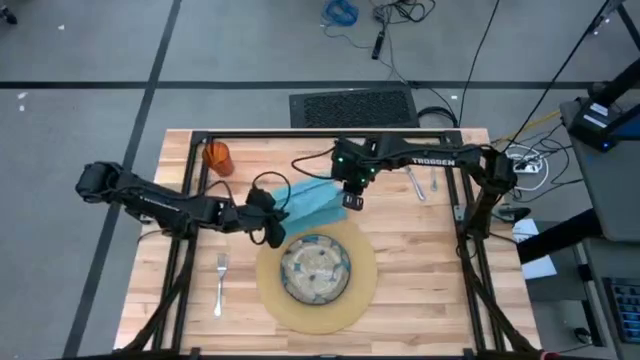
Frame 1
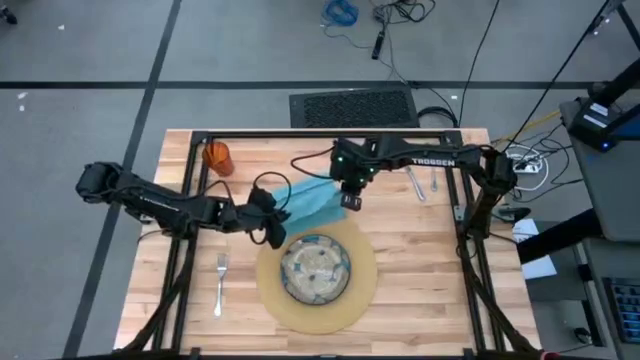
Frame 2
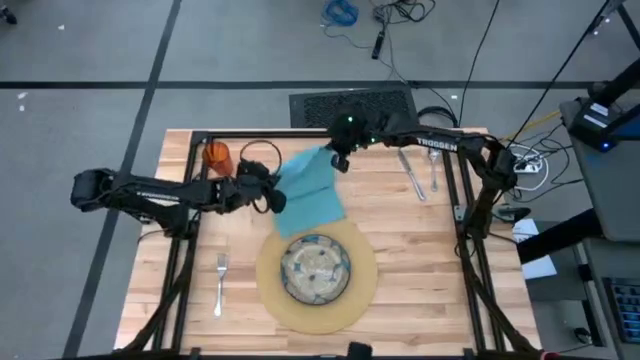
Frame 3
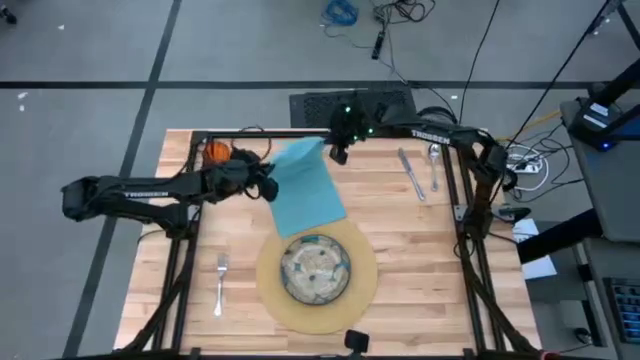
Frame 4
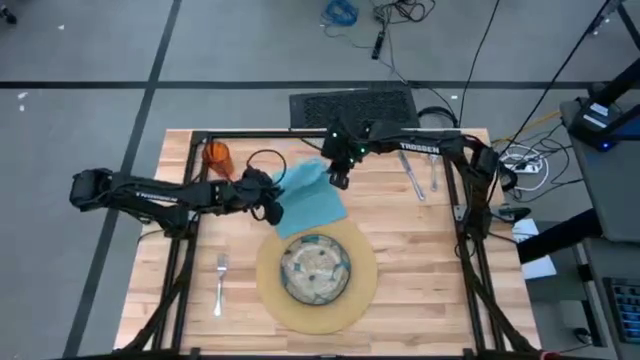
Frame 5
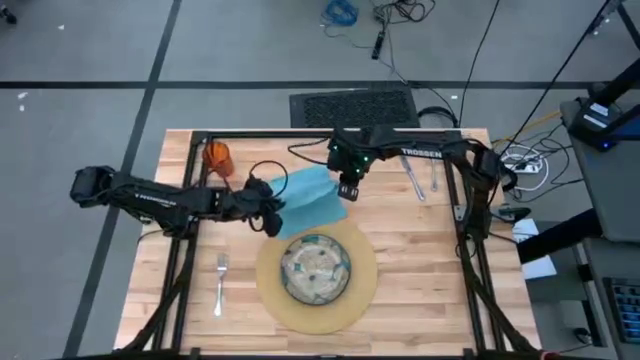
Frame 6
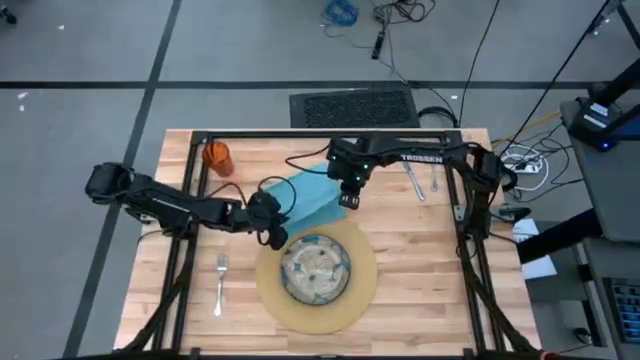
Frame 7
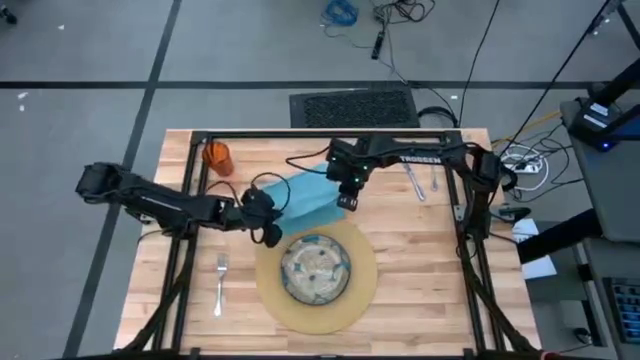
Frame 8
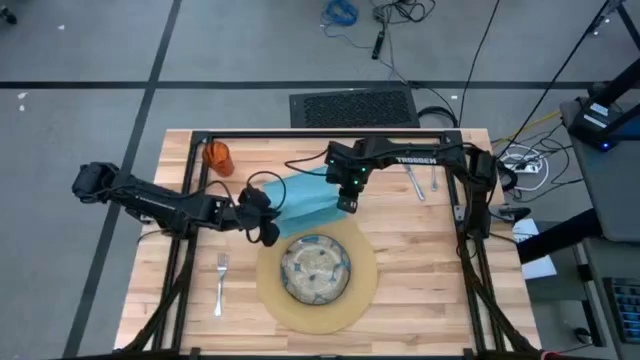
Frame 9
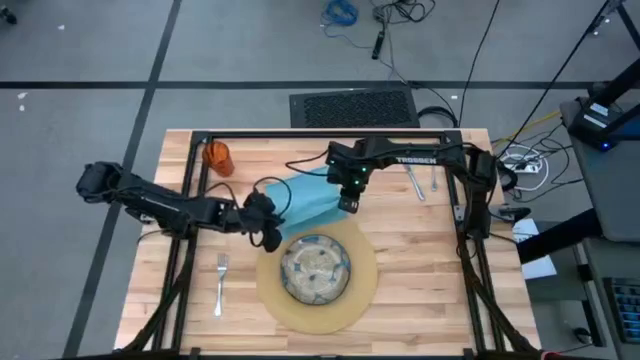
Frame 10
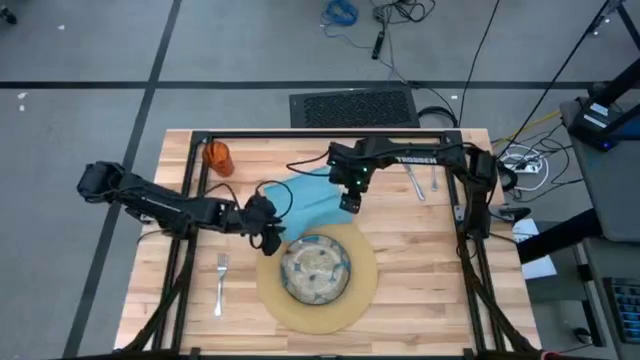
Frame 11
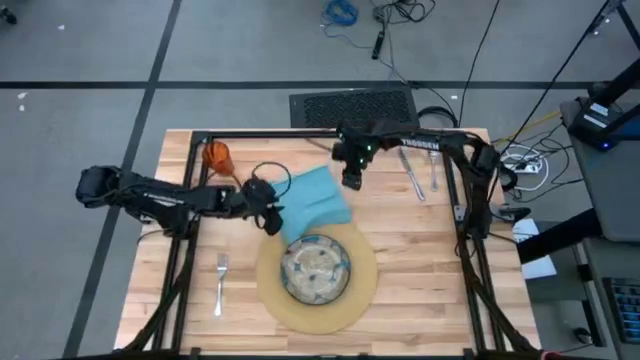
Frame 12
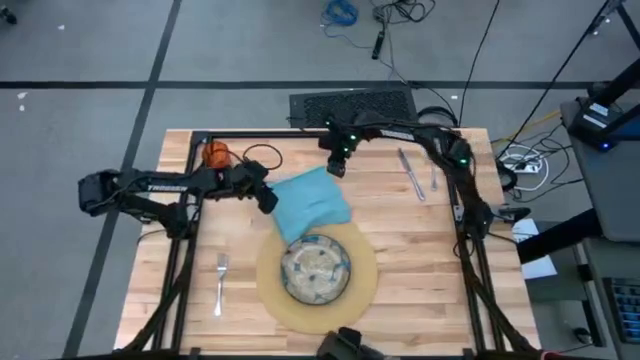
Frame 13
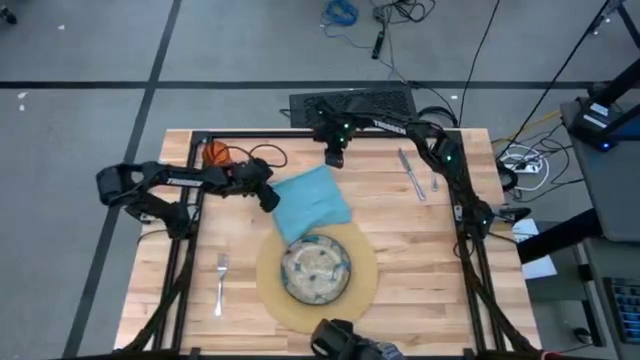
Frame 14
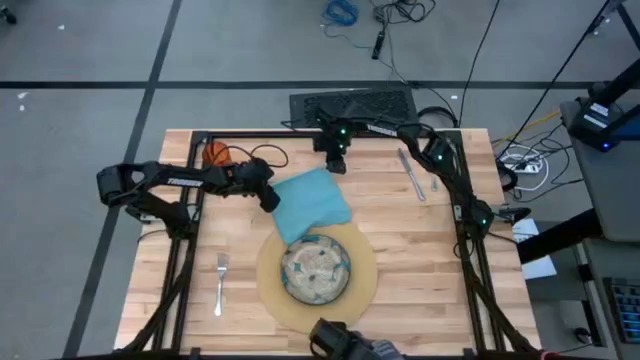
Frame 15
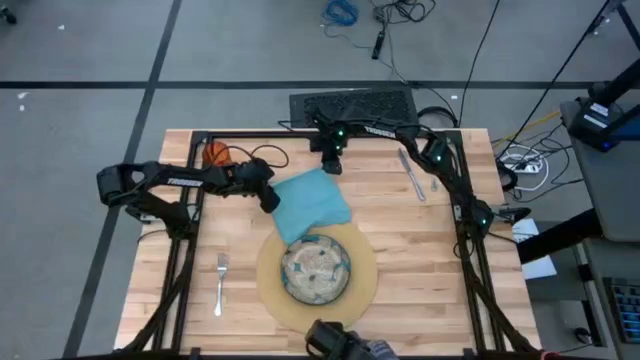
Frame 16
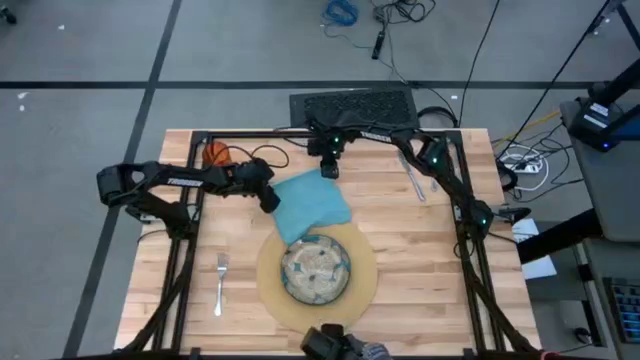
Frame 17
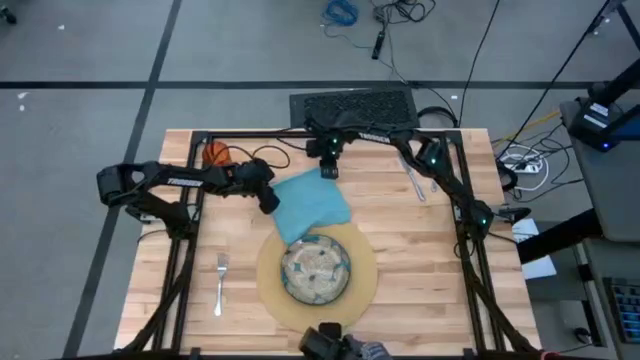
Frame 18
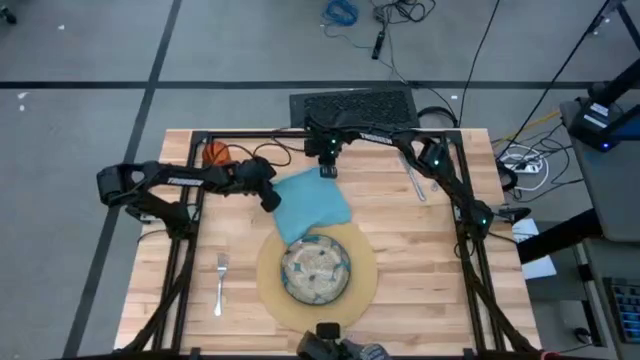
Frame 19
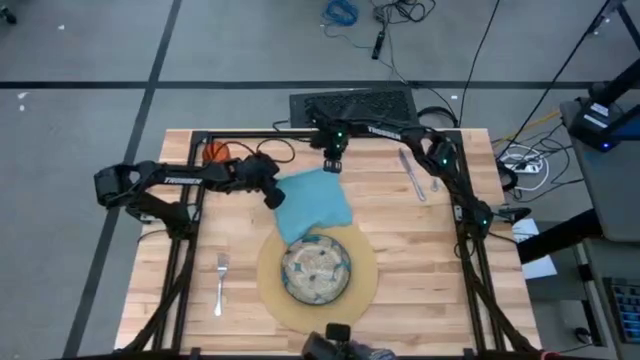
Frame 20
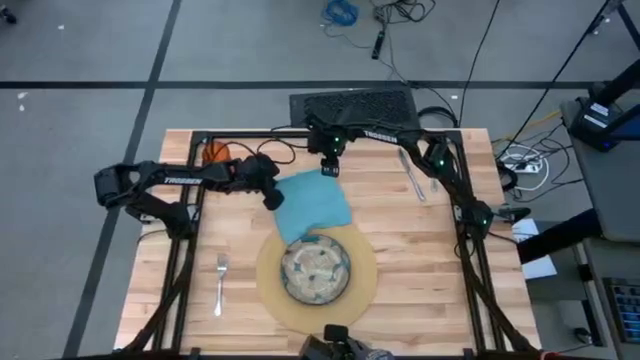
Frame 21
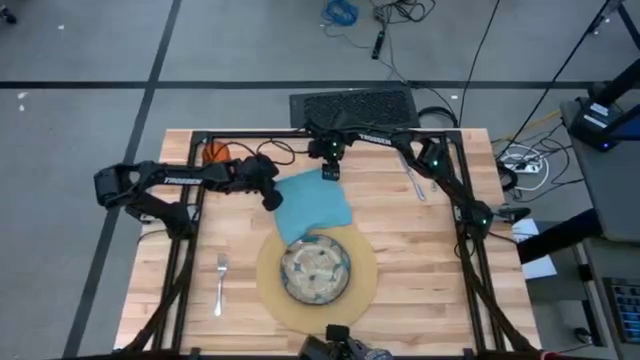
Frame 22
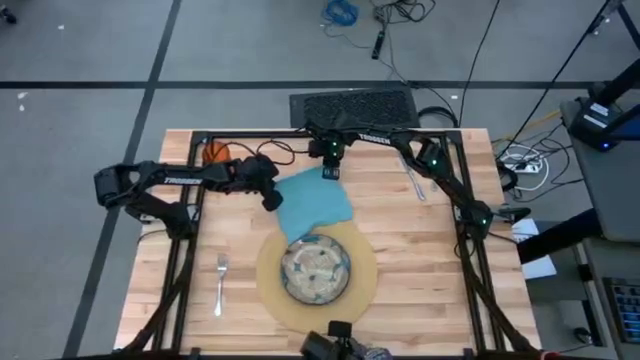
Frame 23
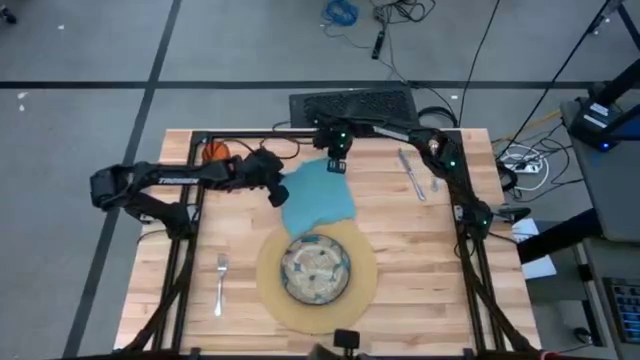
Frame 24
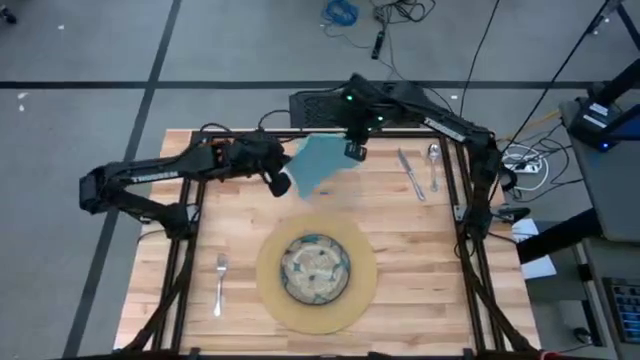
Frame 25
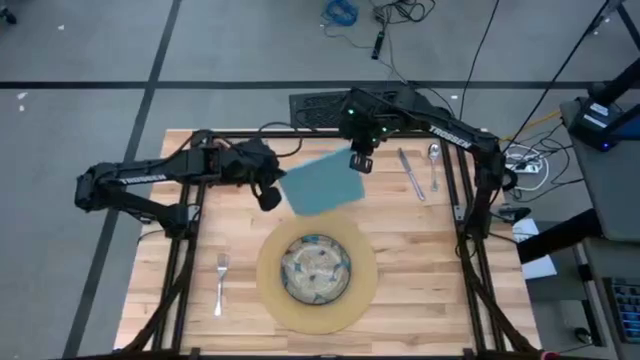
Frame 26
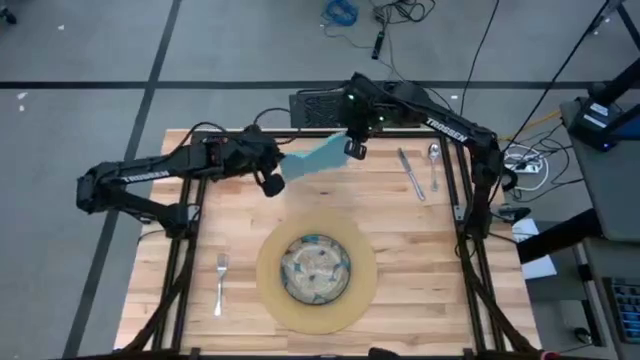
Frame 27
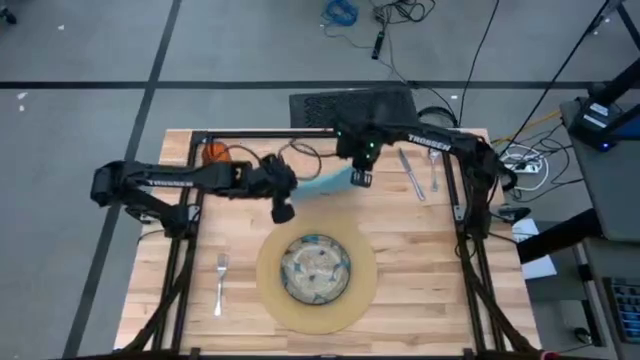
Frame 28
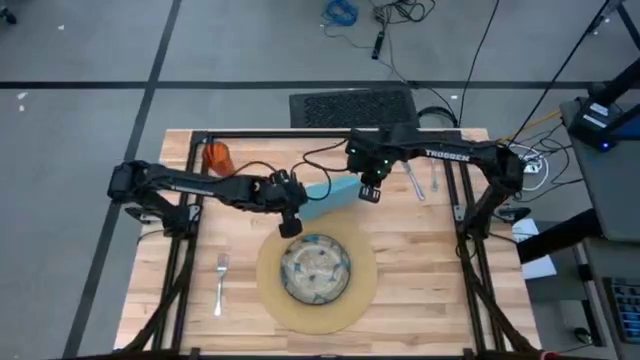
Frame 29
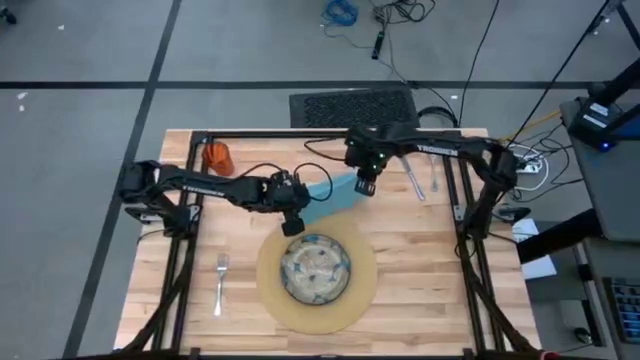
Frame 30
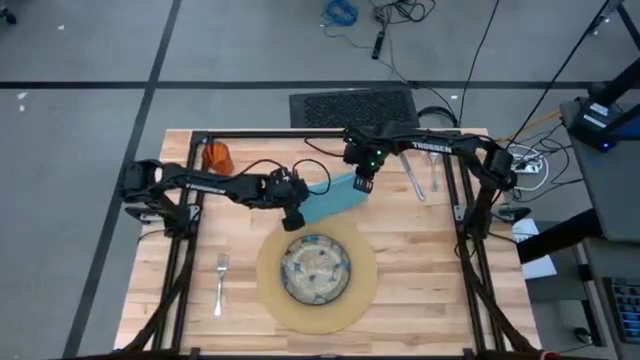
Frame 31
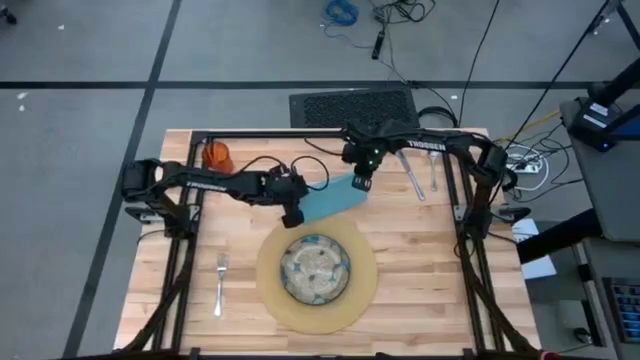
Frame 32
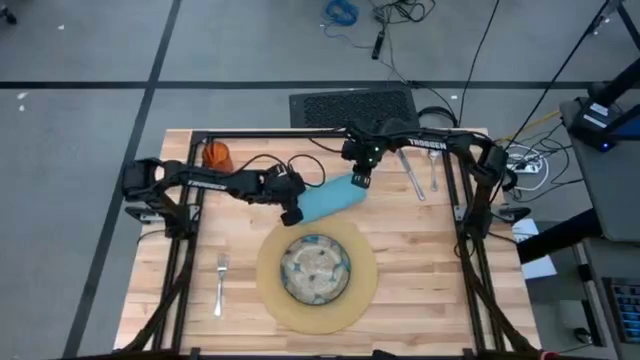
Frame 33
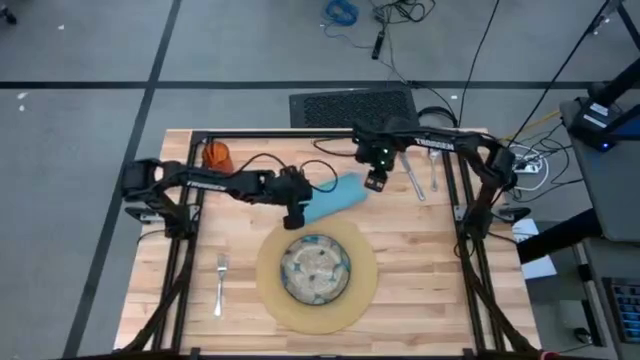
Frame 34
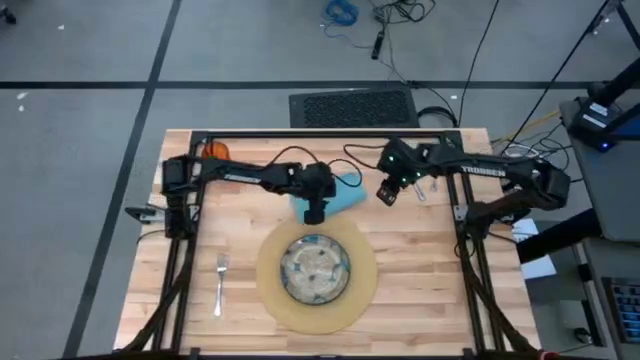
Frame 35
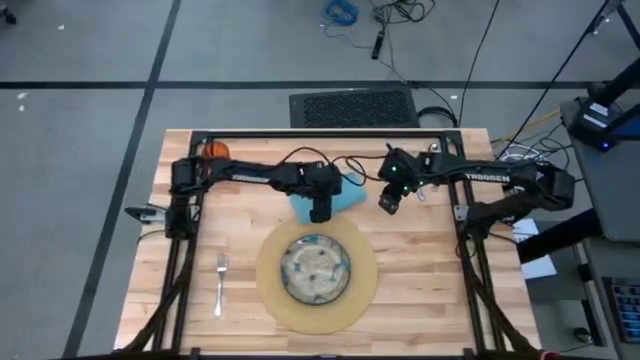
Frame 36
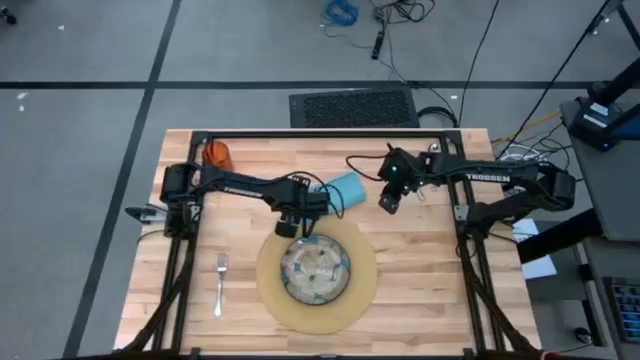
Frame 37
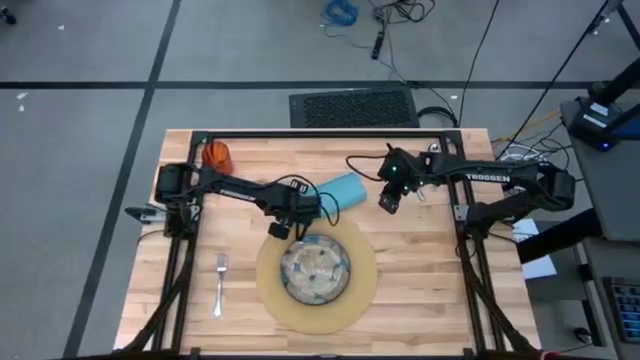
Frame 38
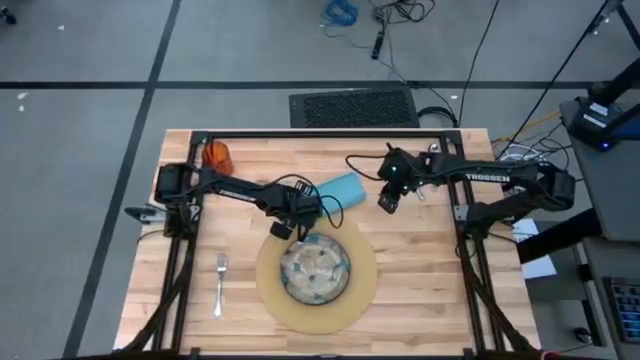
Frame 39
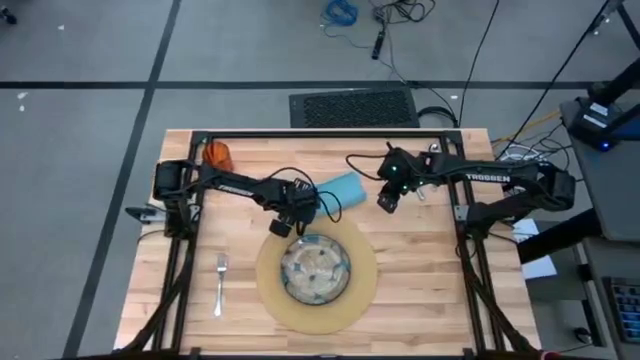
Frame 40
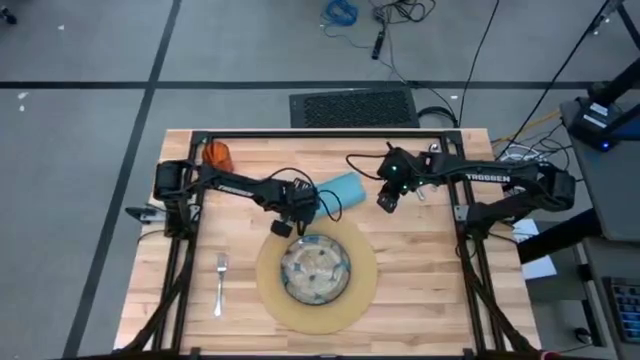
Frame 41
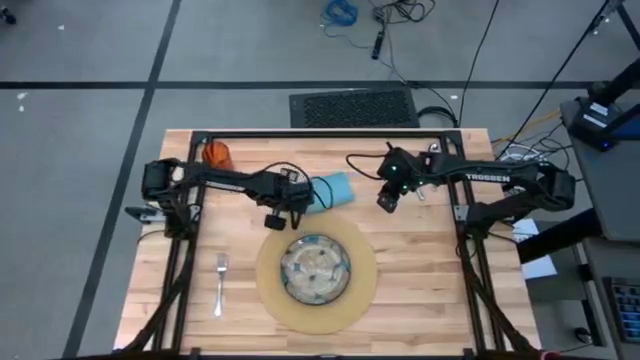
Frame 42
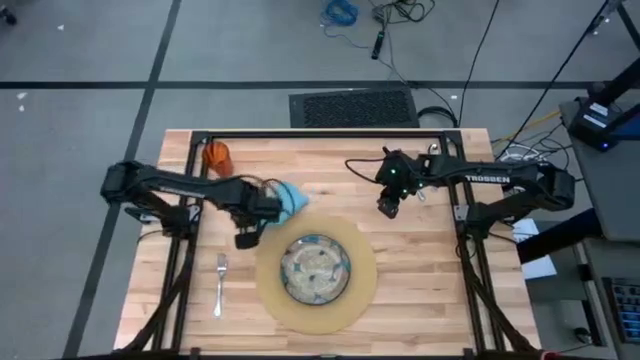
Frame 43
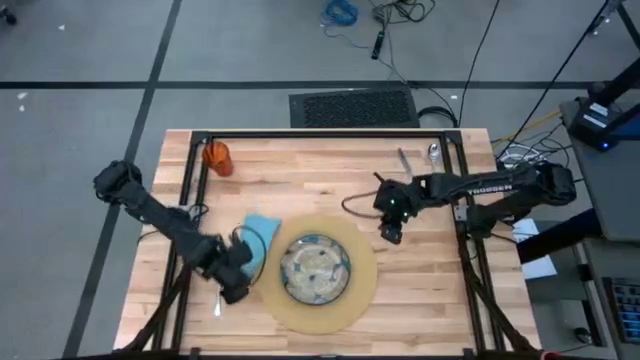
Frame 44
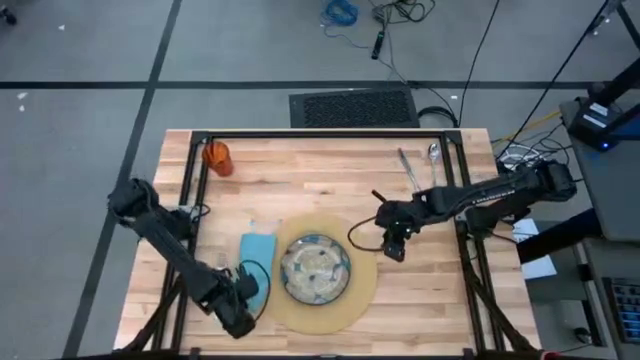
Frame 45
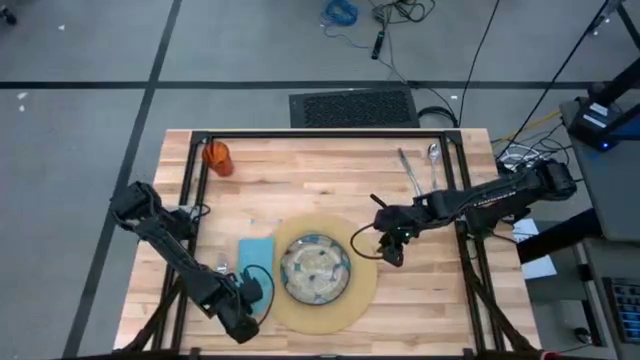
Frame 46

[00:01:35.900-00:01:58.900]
Task: Set table place
Fold the blue napkin
